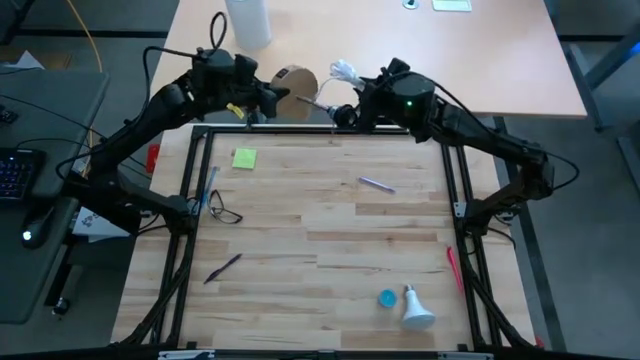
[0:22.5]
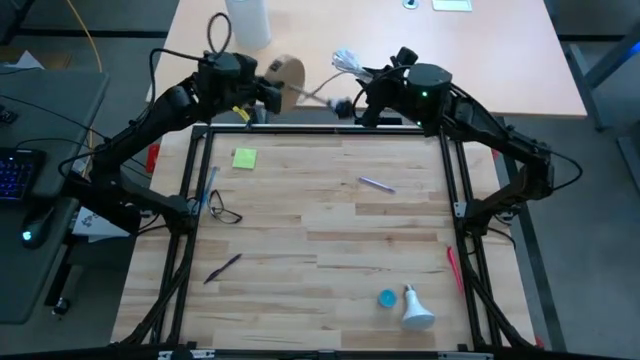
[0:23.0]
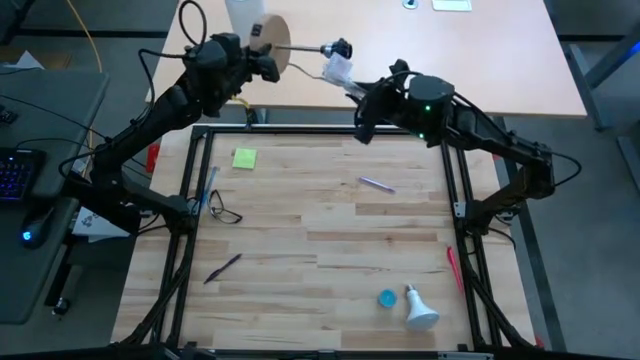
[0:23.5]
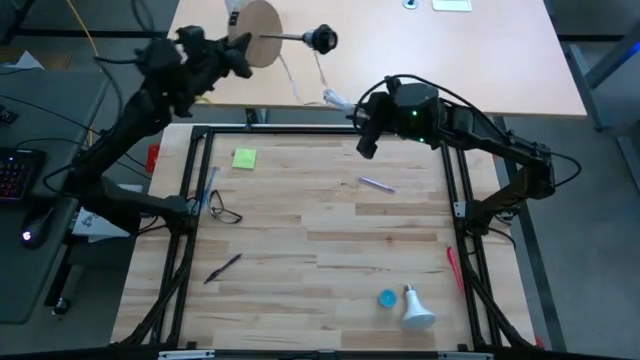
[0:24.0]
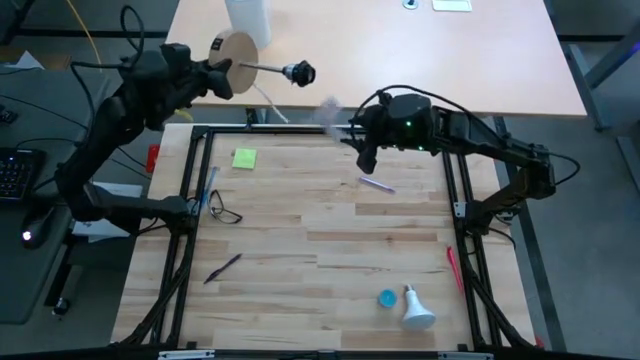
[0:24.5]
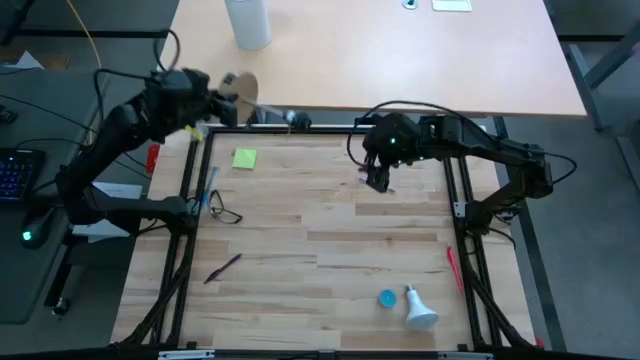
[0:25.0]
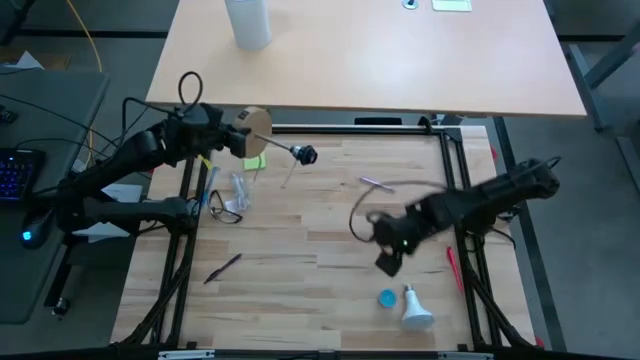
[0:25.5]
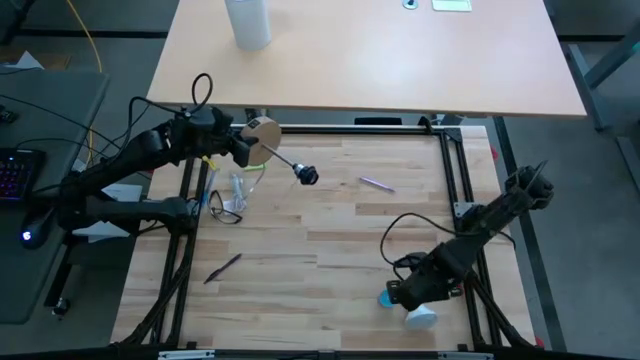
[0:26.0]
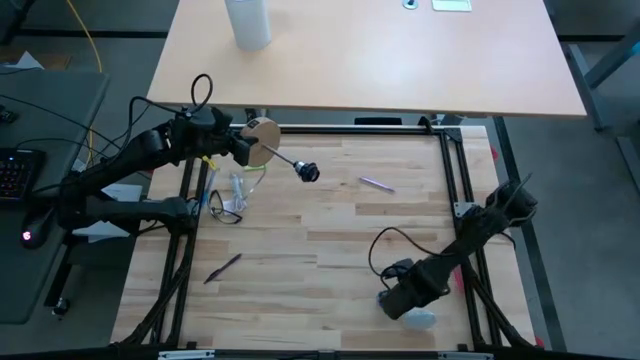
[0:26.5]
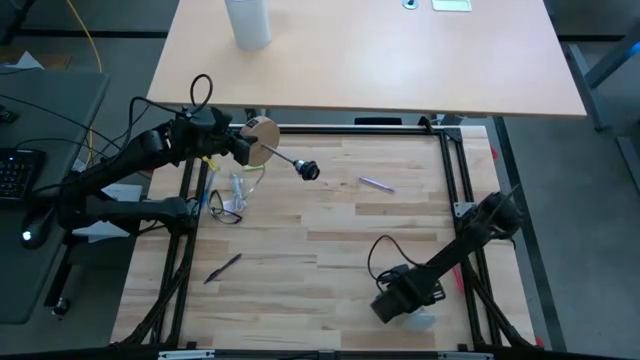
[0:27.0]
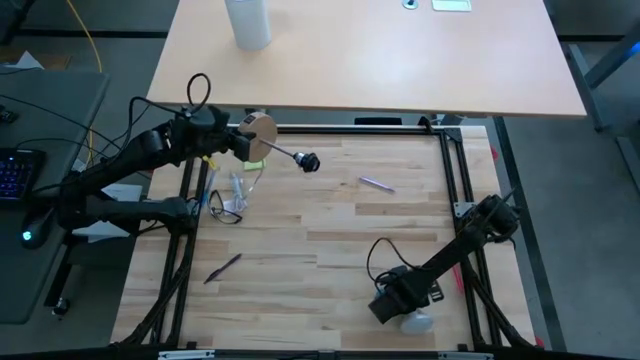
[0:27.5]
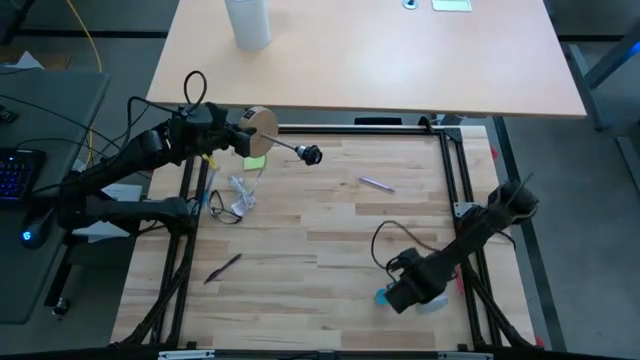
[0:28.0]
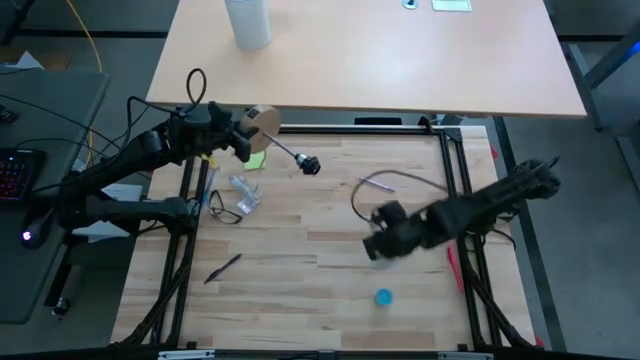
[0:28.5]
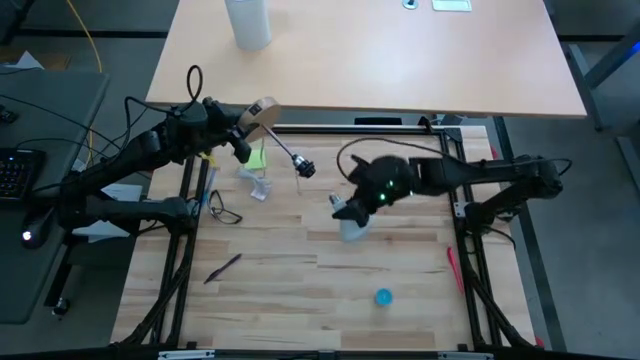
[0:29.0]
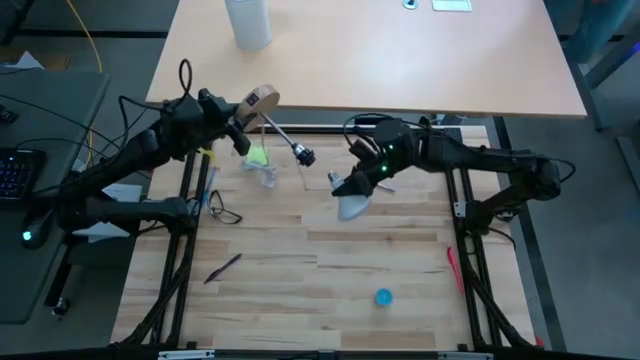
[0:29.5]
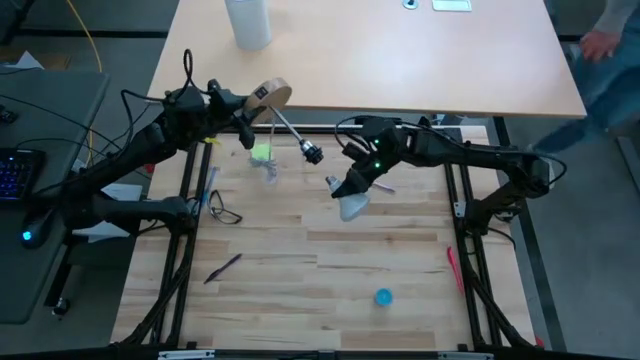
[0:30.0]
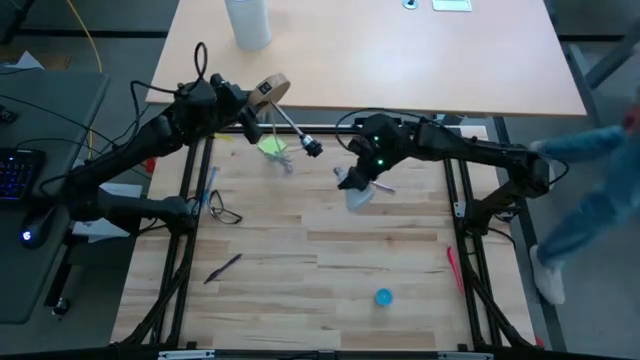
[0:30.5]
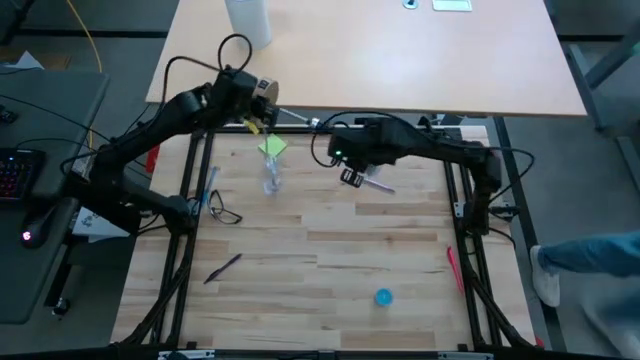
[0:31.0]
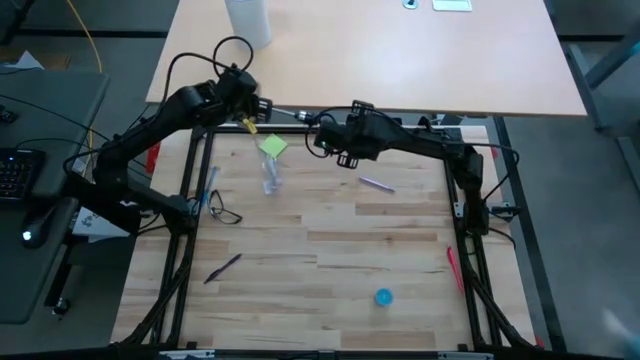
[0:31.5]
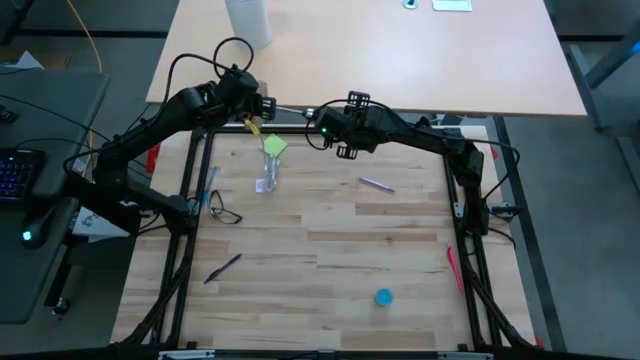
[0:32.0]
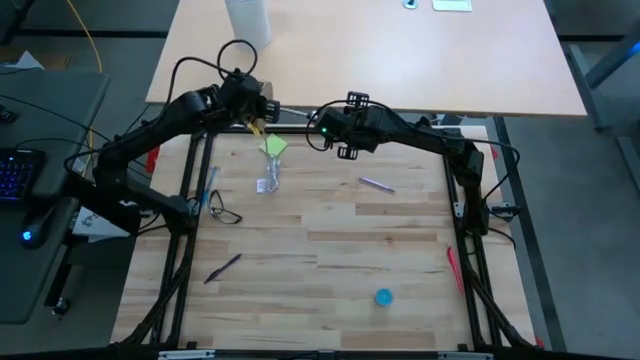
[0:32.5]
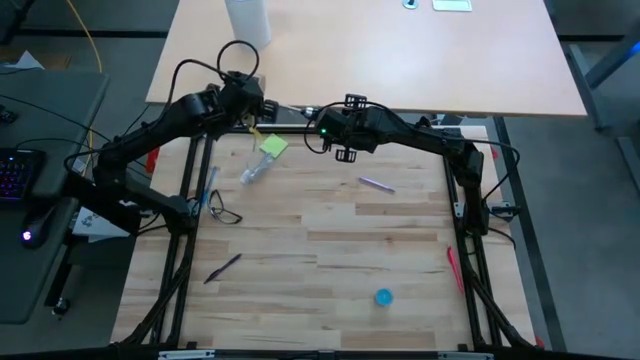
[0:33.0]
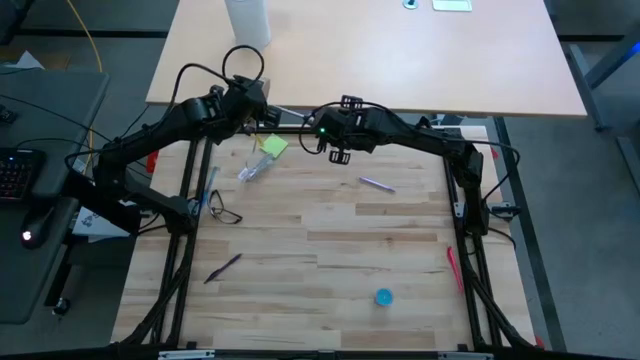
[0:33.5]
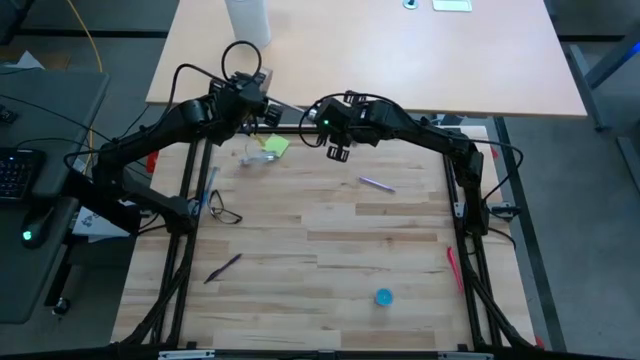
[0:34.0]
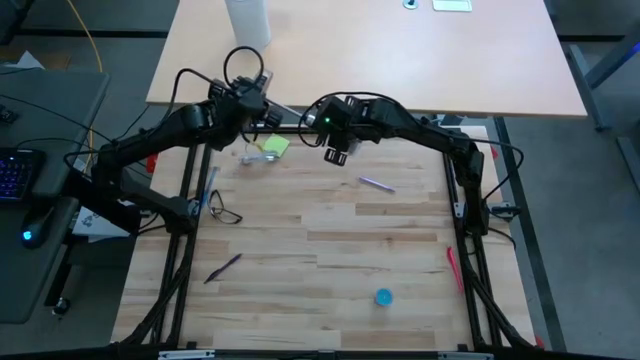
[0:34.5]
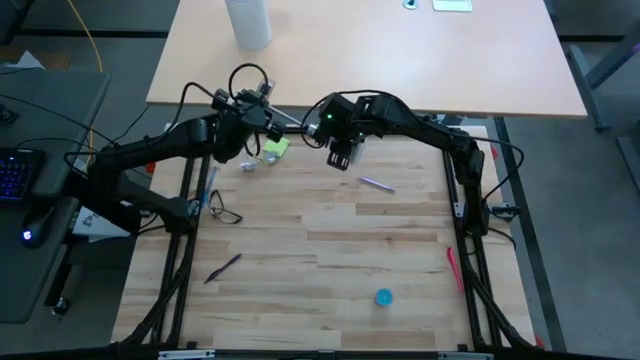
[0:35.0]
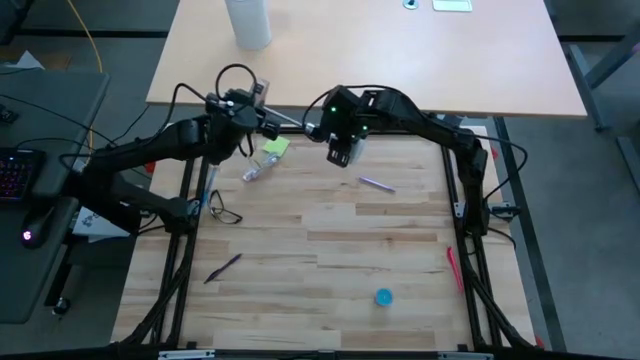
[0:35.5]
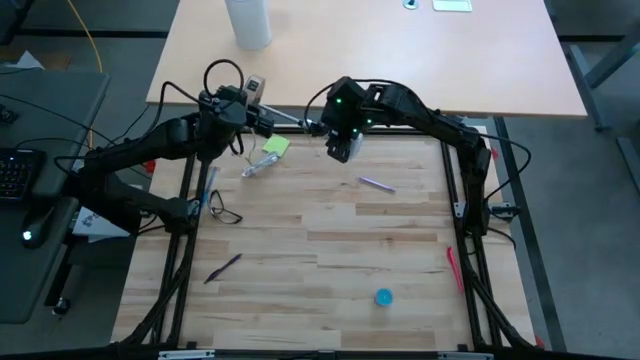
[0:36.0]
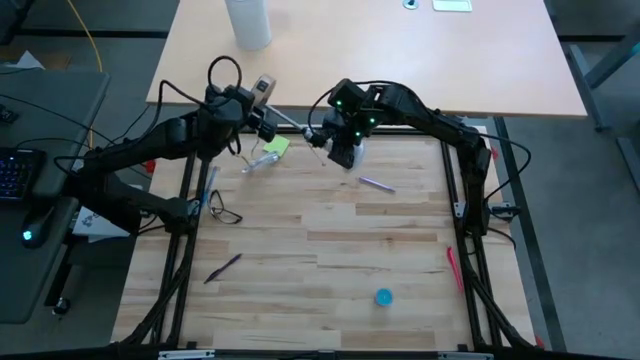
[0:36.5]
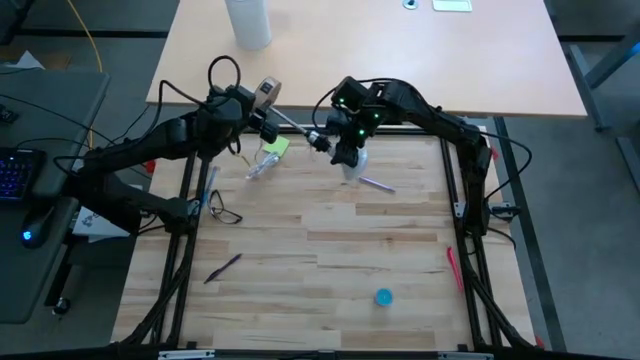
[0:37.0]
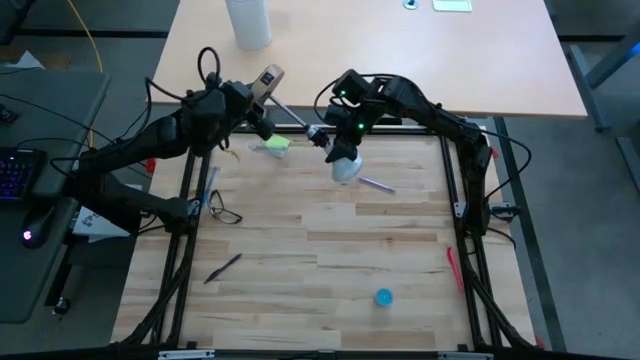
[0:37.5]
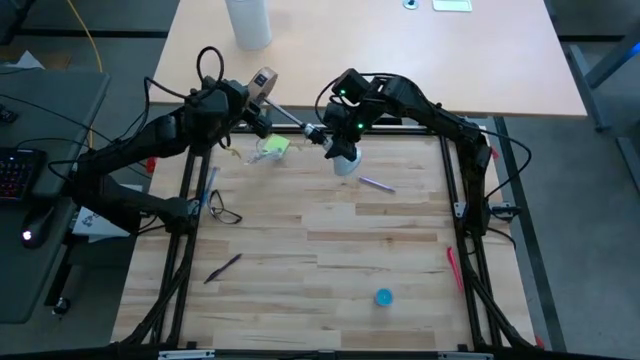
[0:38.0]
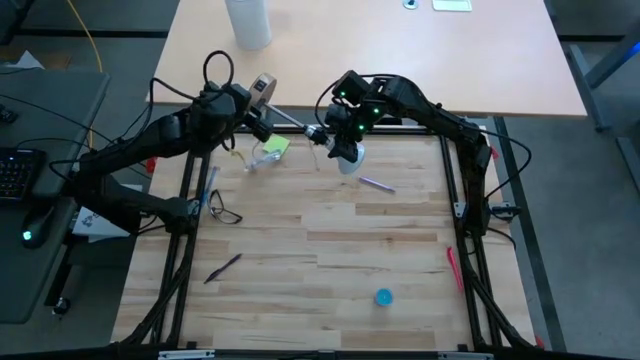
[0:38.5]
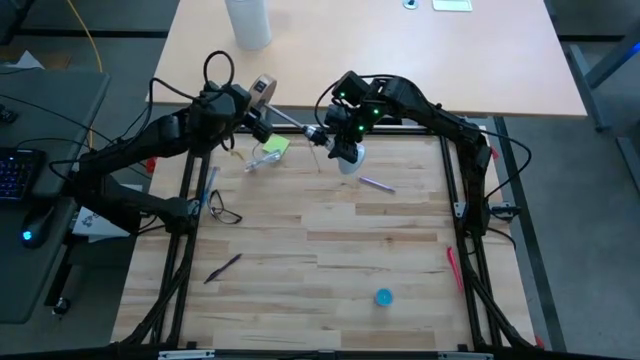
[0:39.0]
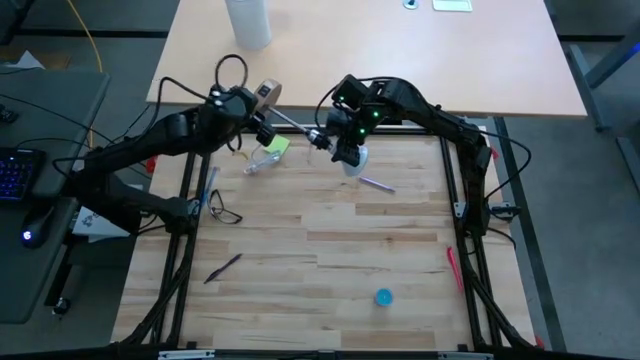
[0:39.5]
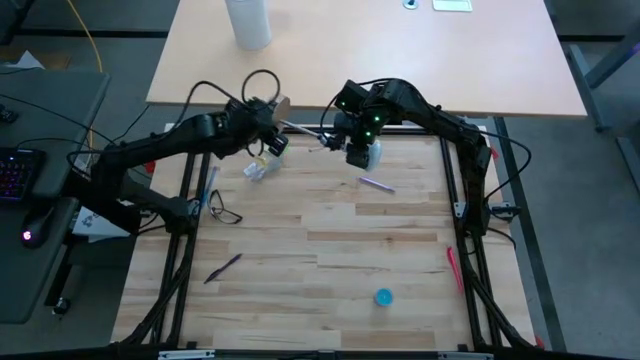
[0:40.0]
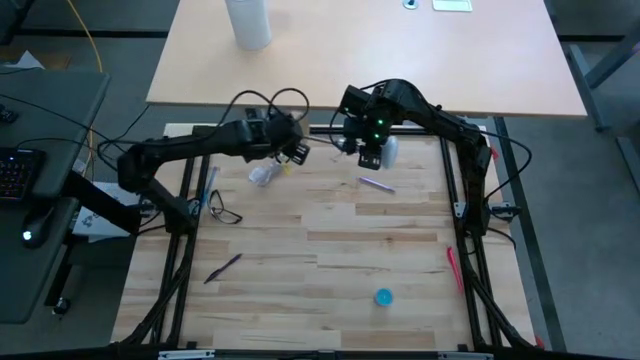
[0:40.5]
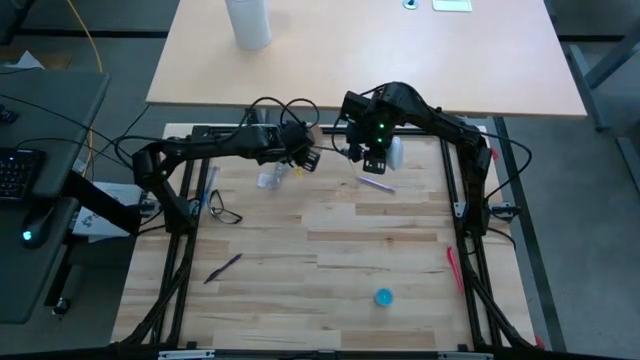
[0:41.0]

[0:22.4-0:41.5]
Task: Screw lightbulb
Insert the lightbulb into the lamp

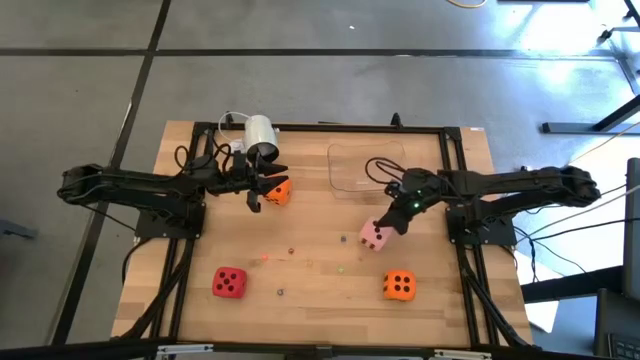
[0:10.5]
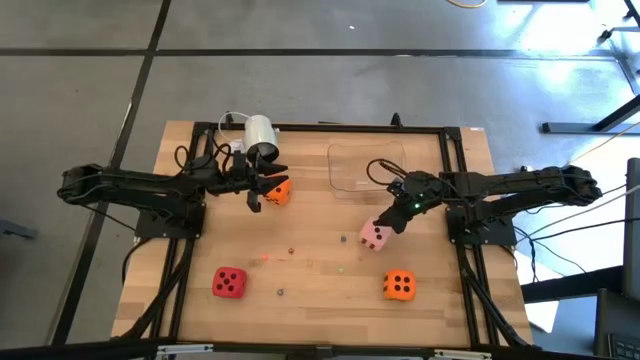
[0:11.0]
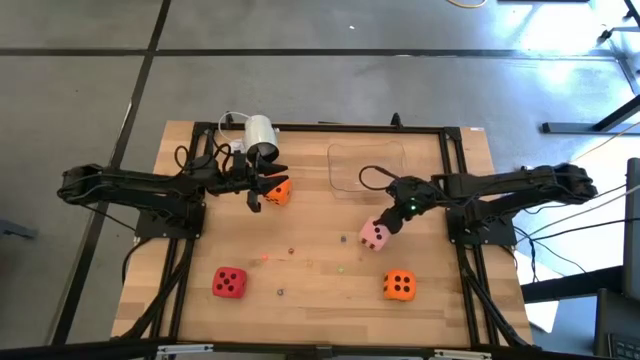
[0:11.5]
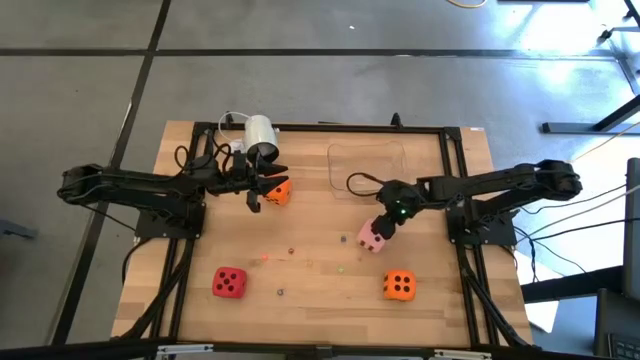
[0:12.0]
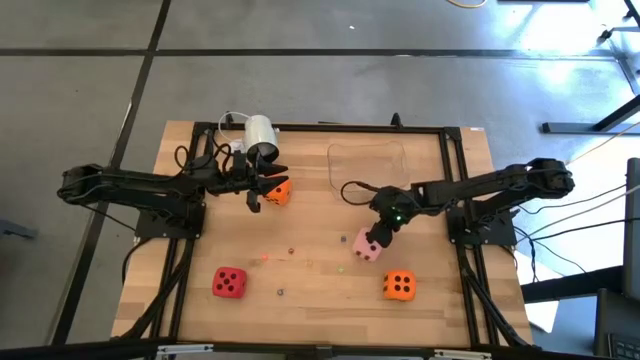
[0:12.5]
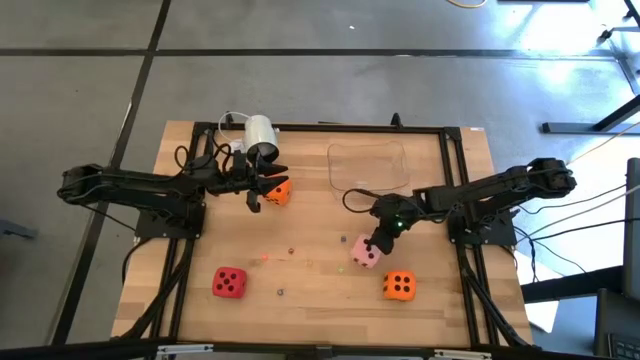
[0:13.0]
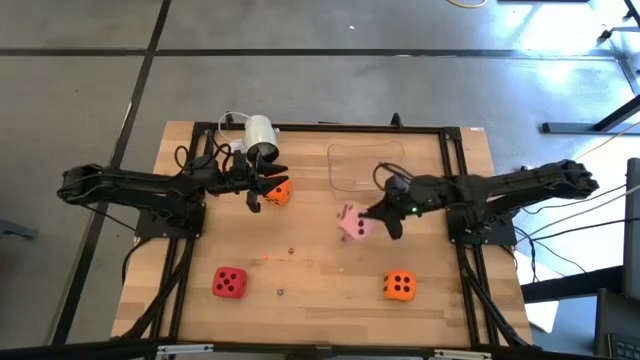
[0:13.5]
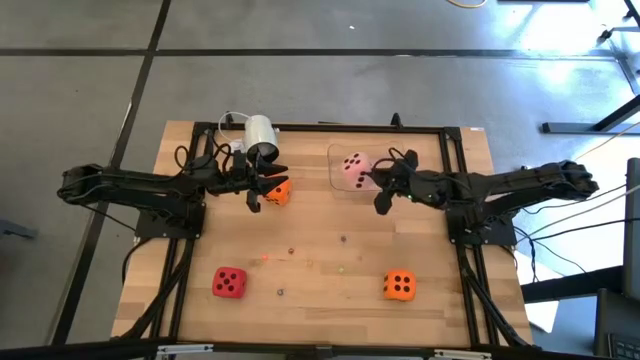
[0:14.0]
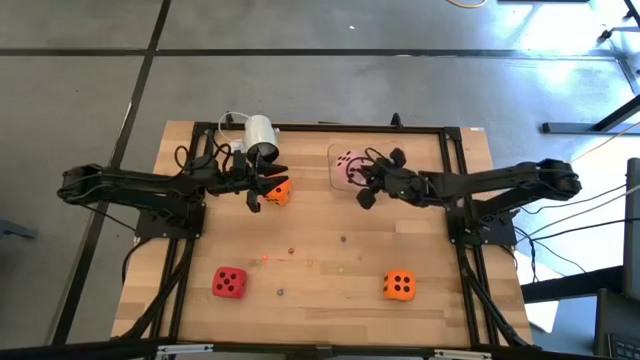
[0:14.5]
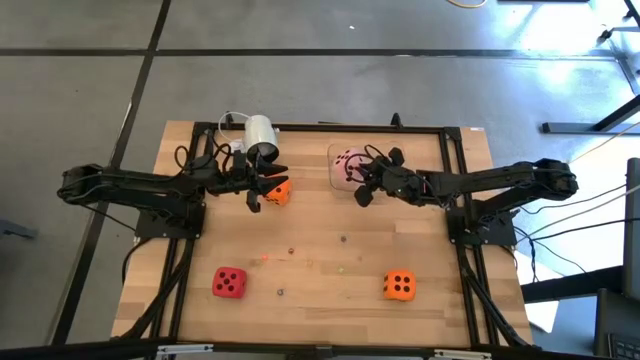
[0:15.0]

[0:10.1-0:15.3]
Task: Pick & Place Dice
Put the large pink die into the transparent bin
